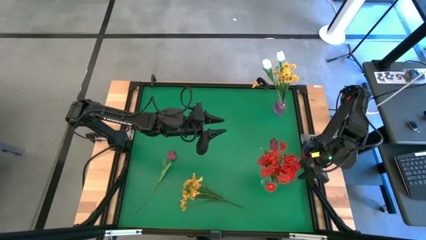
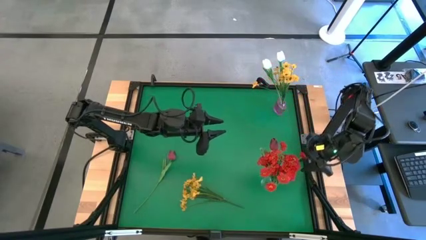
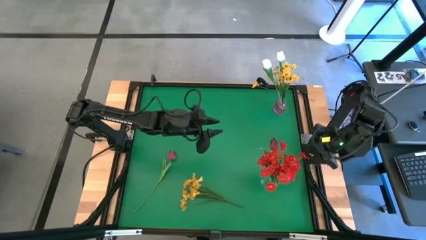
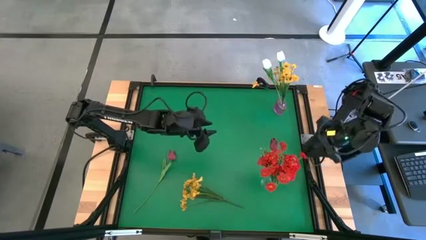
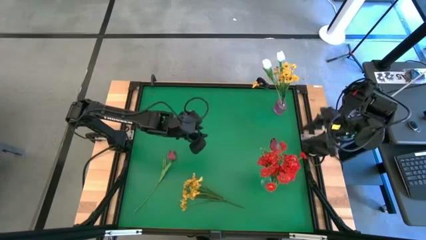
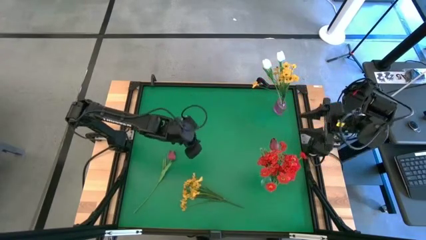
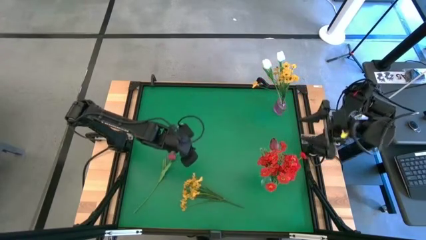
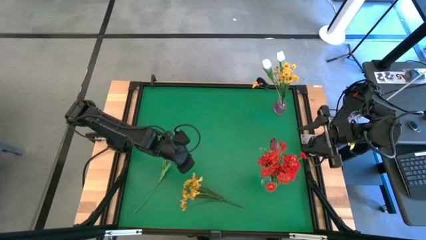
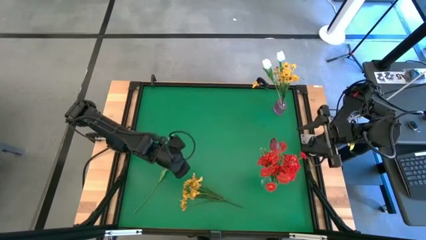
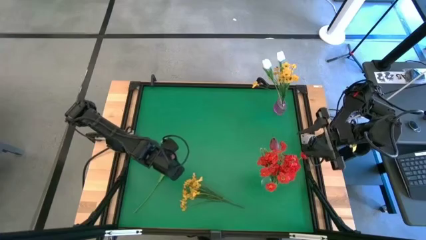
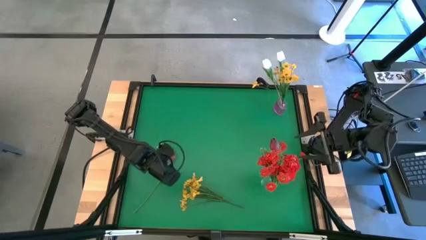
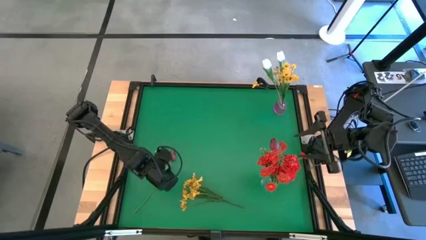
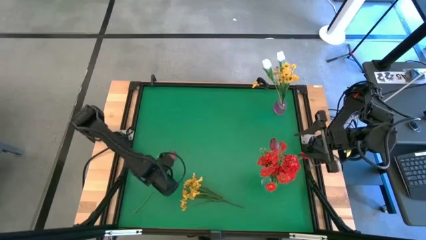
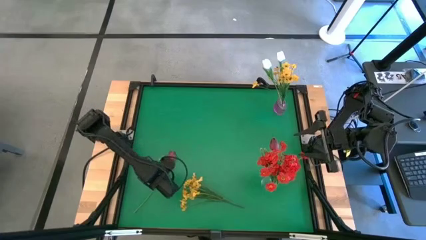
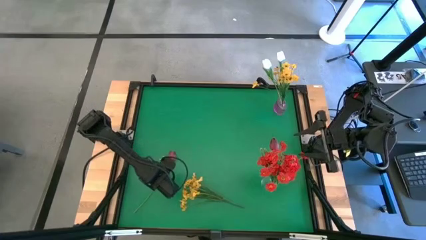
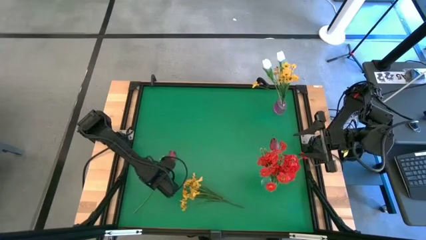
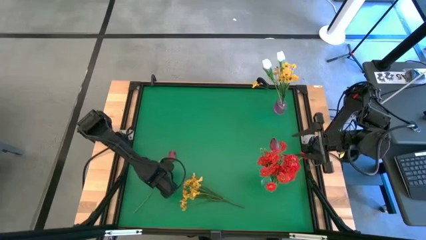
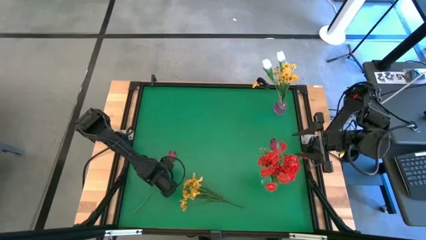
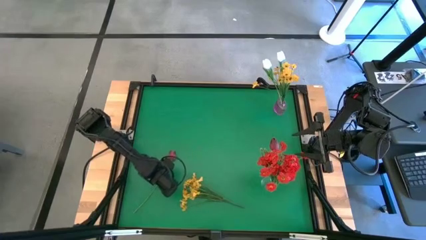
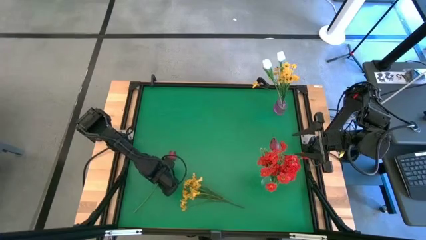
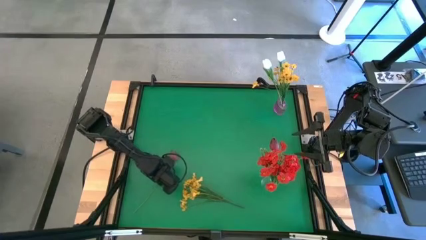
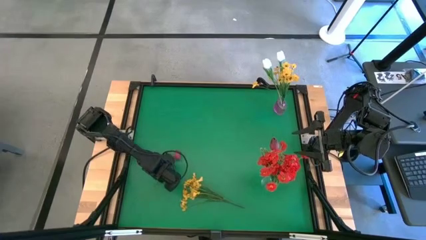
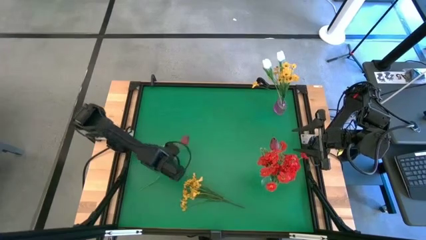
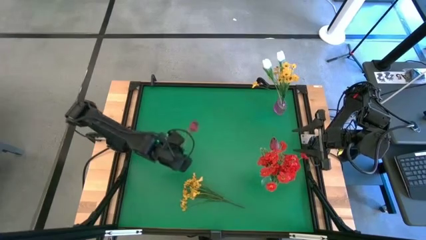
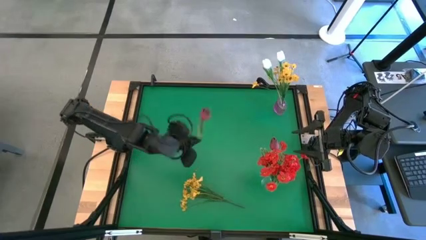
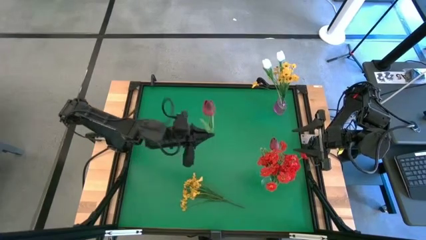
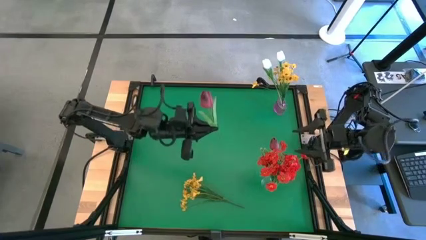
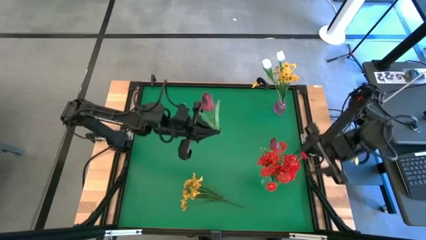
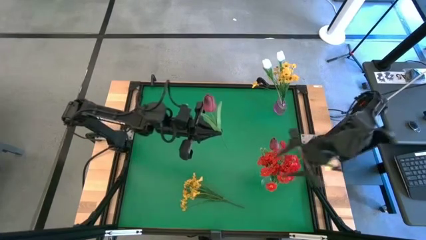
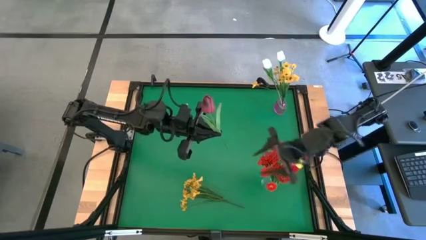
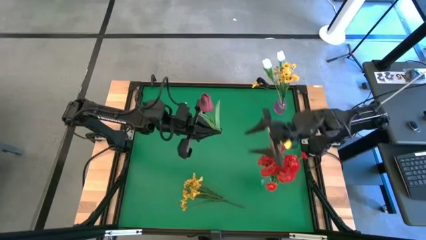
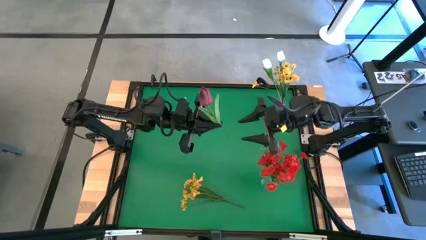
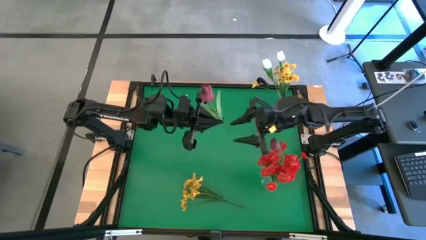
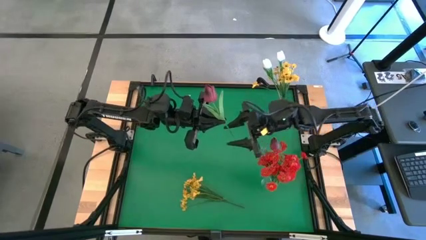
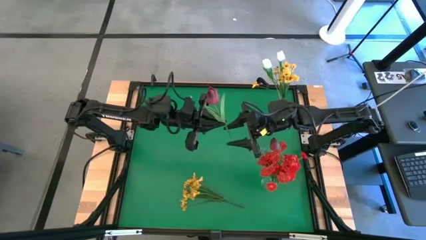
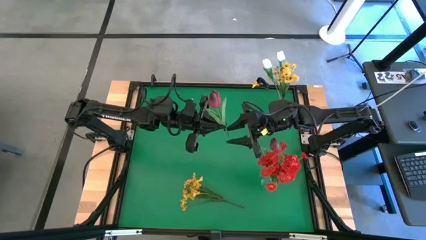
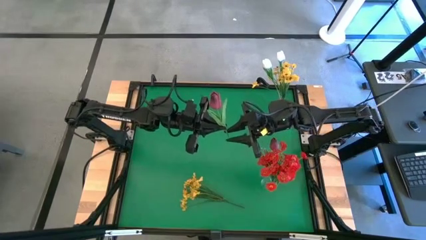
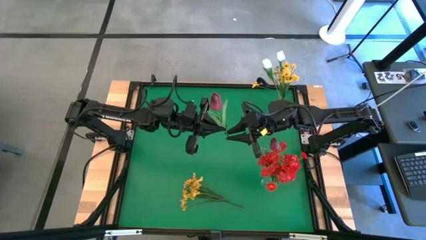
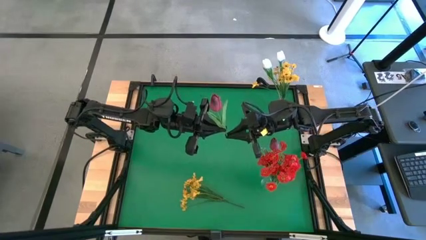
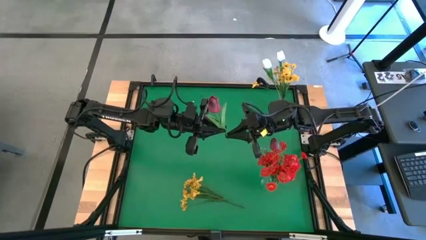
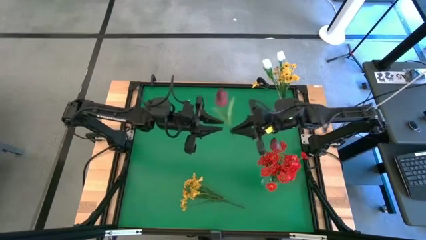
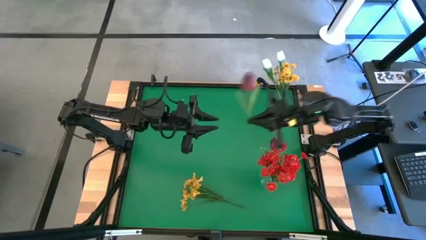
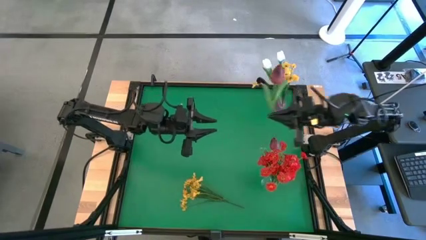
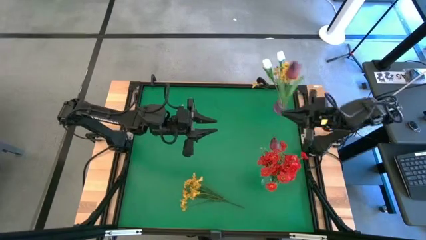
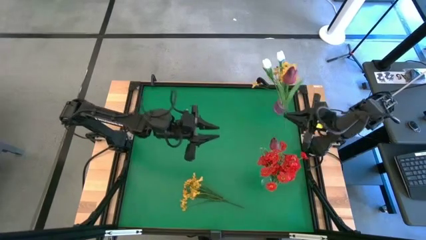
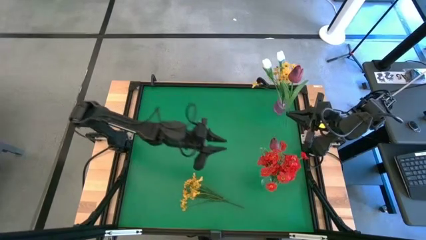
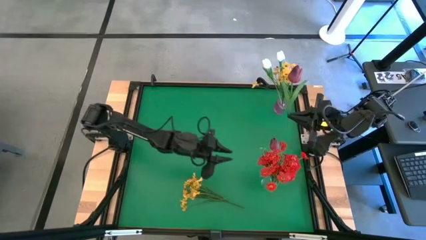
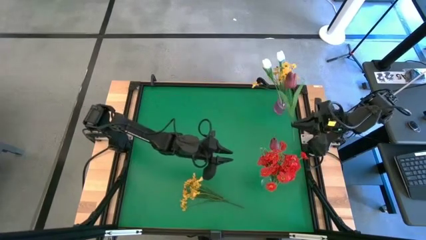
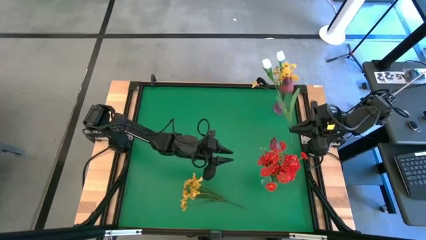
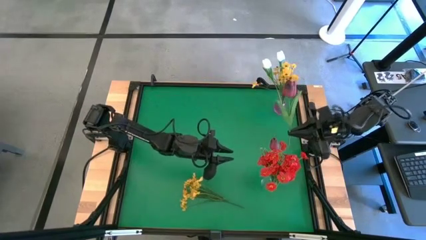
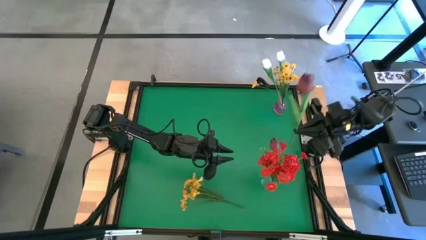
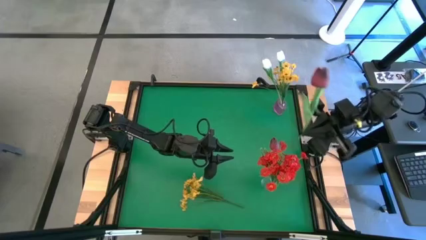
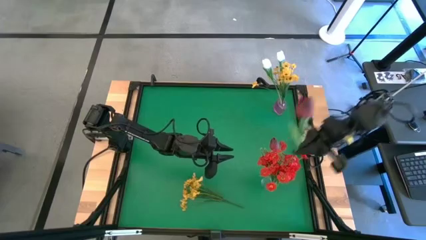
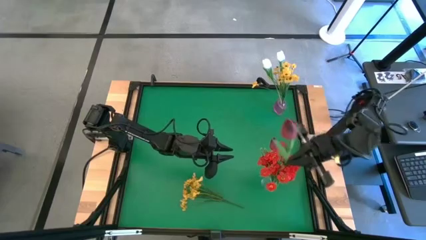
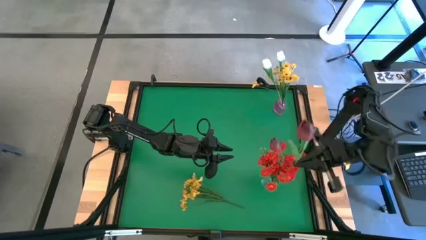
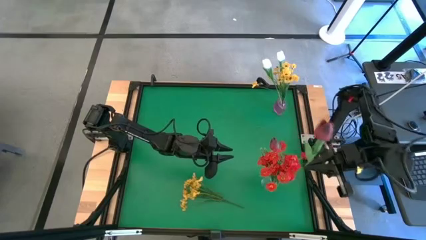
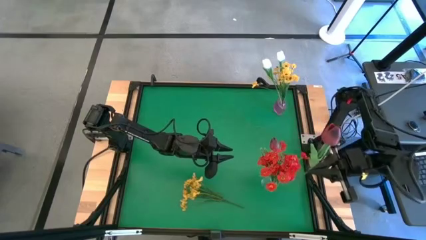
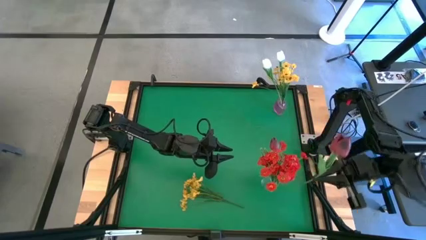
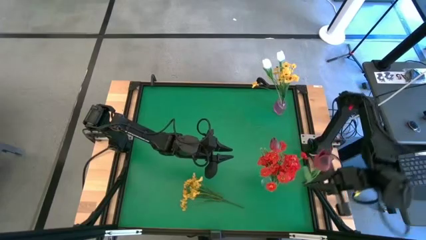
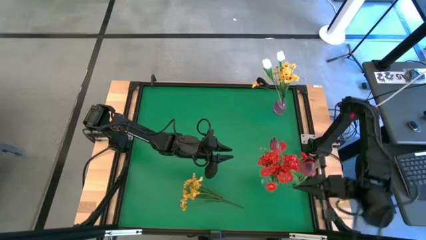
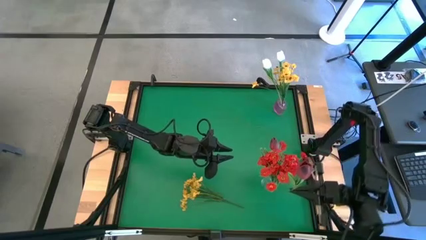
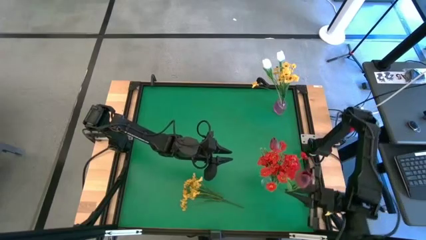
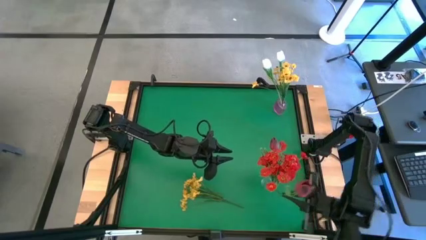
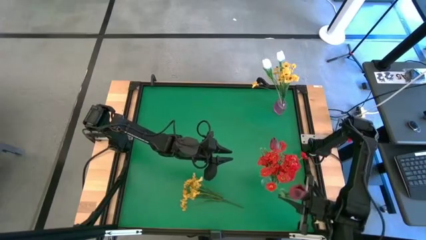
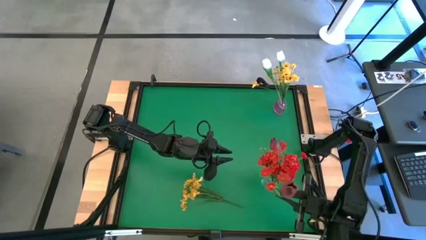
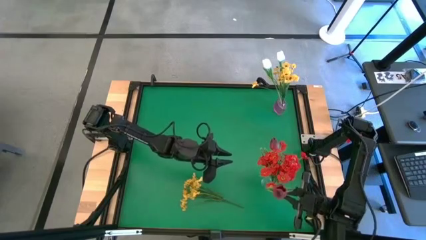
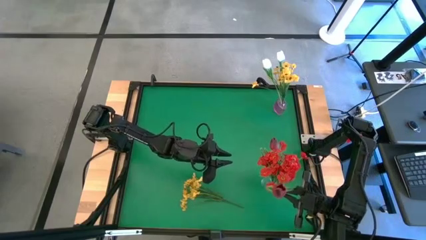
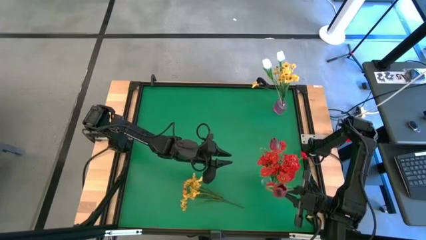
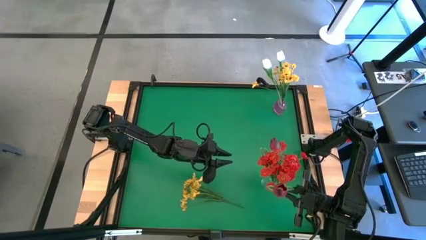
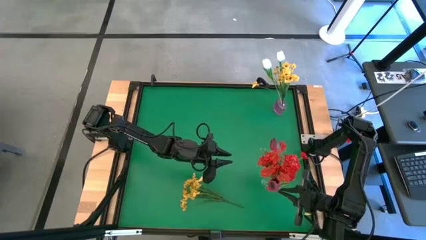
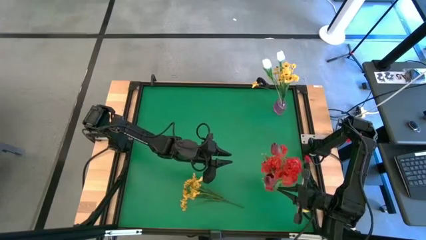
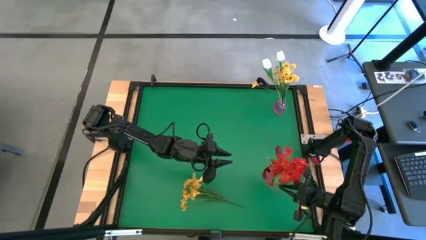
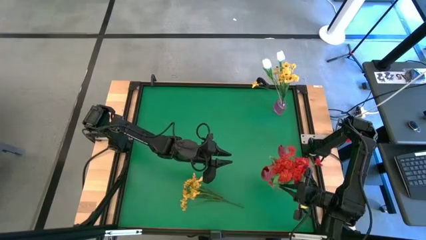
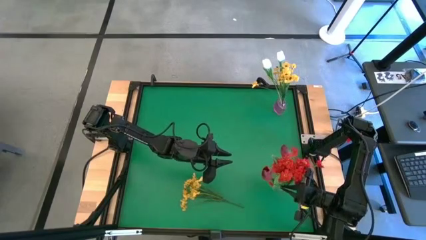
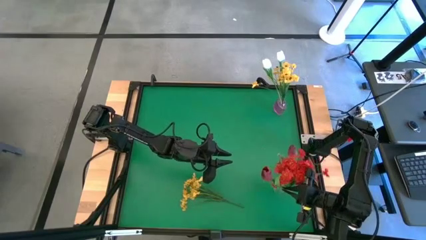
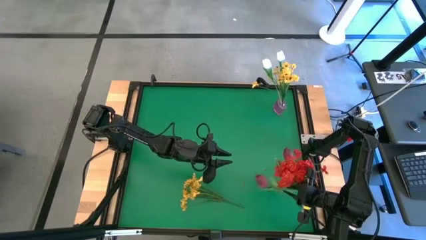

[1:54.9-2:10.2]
Task: Sort flowers into vase by color
Put the red tulip into the transparent vase
